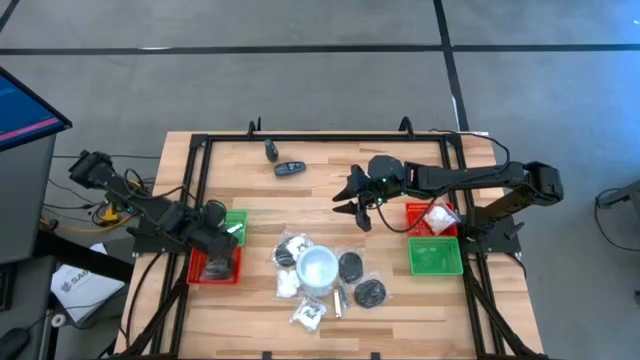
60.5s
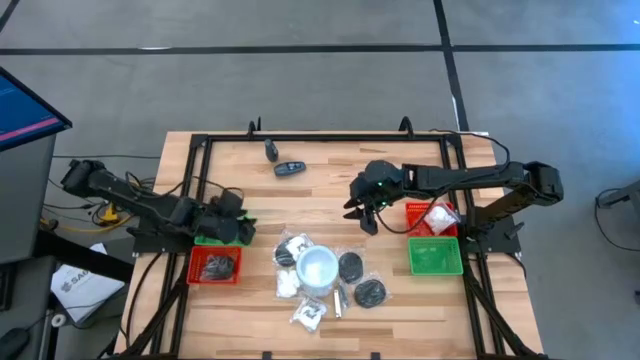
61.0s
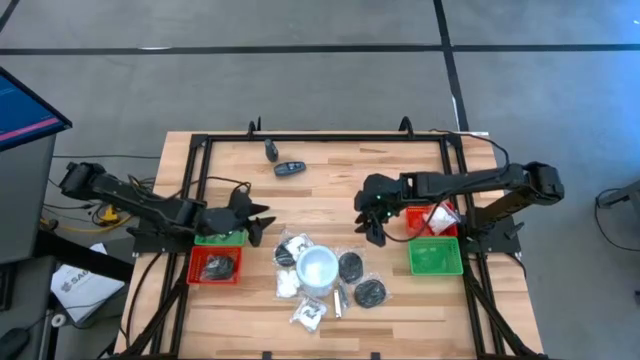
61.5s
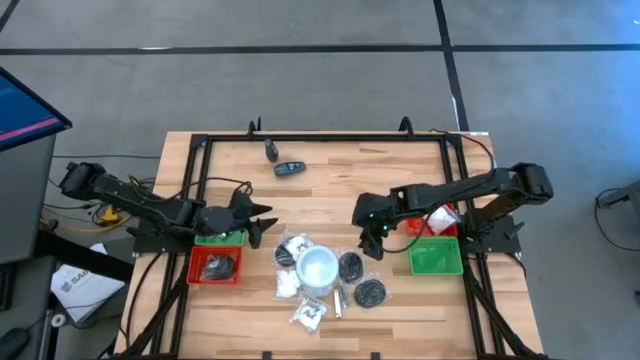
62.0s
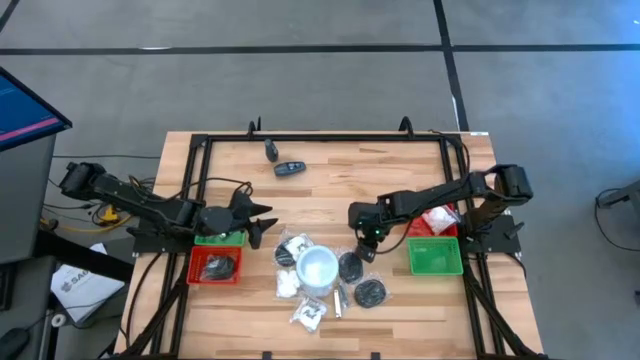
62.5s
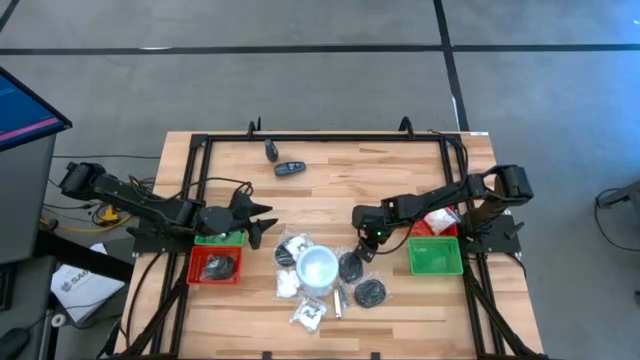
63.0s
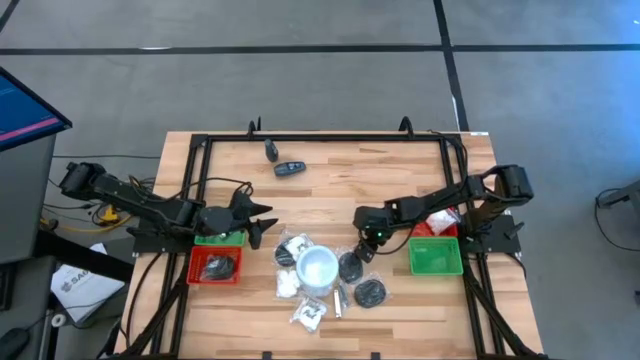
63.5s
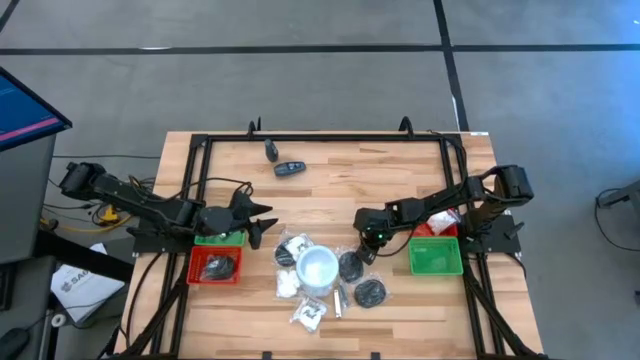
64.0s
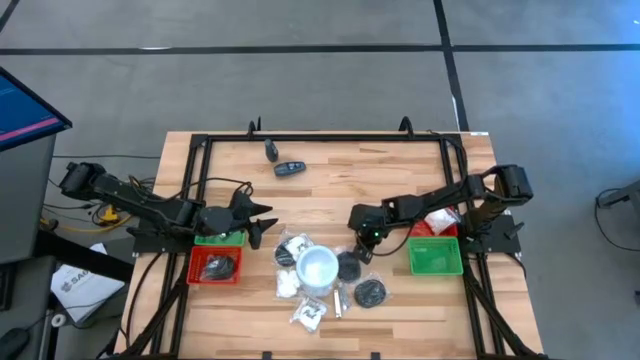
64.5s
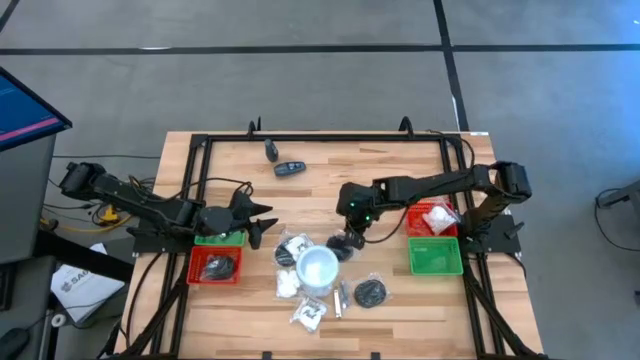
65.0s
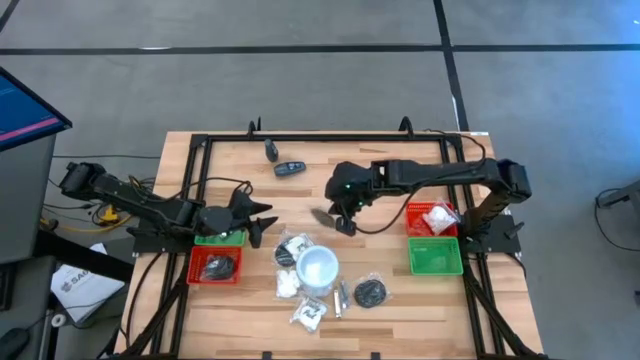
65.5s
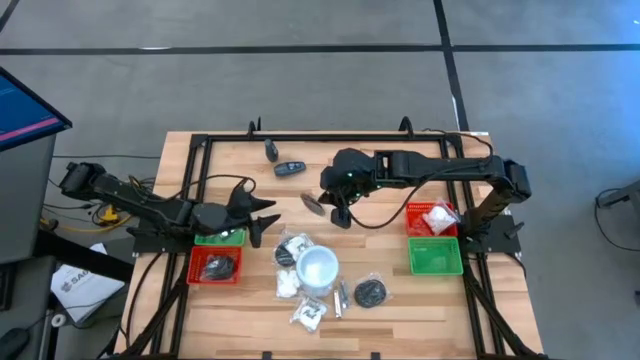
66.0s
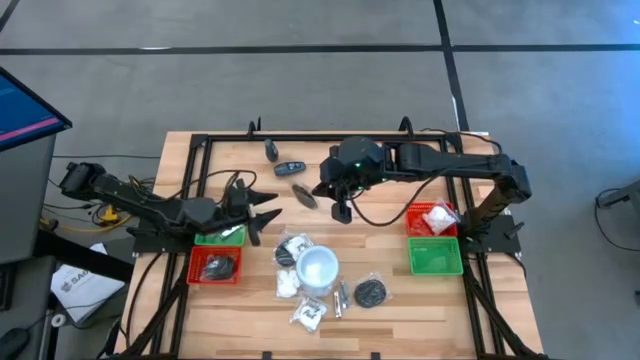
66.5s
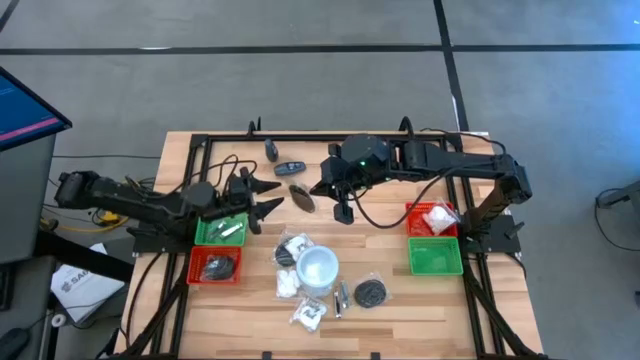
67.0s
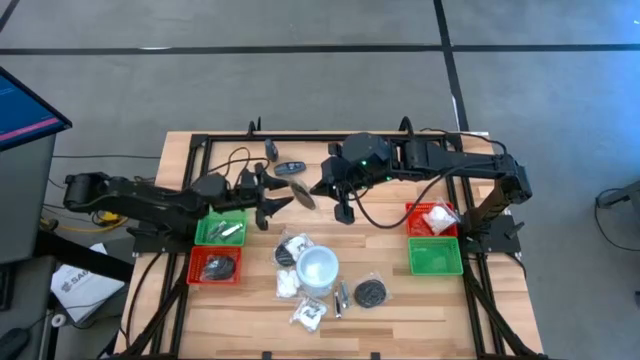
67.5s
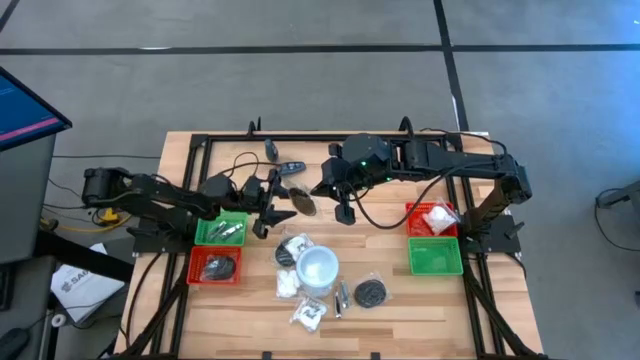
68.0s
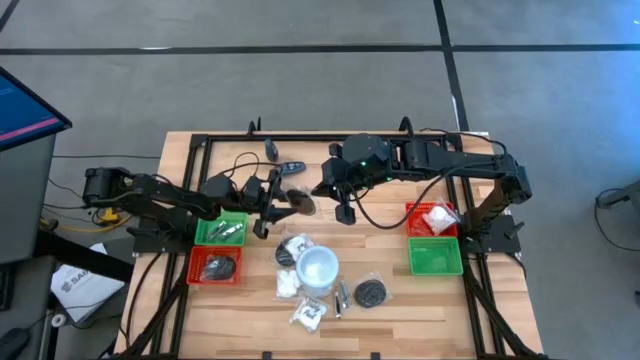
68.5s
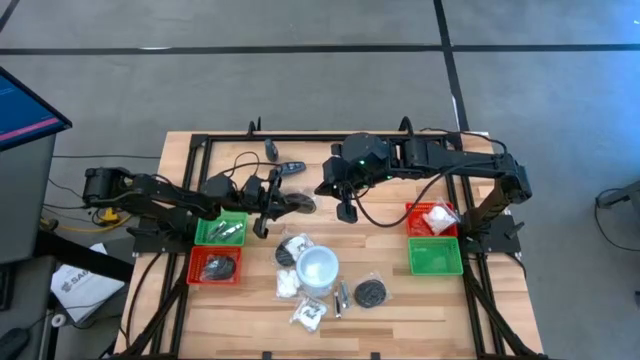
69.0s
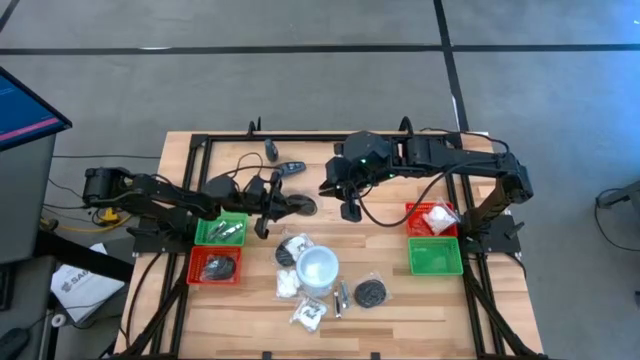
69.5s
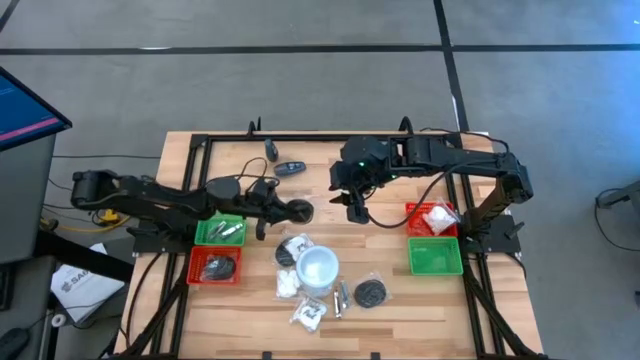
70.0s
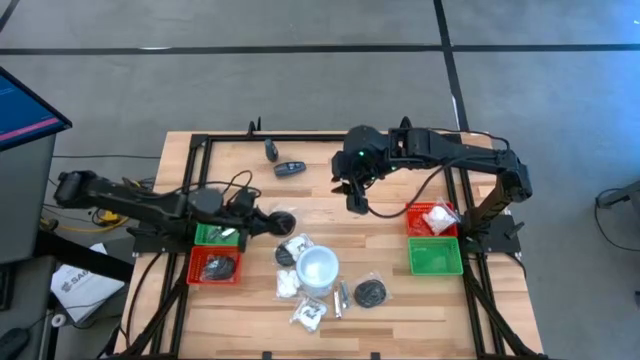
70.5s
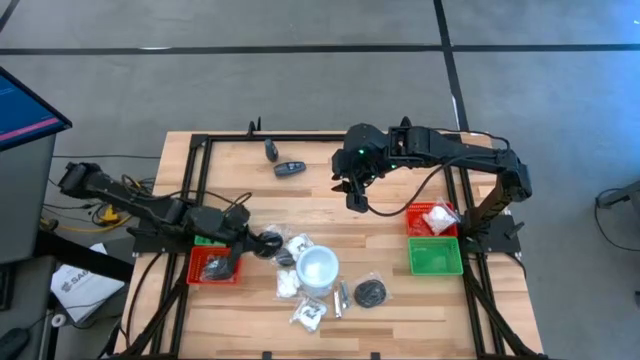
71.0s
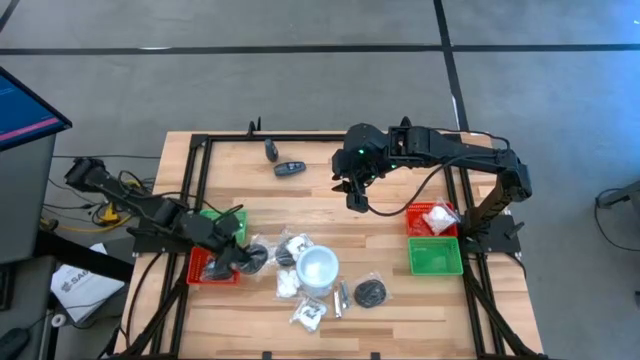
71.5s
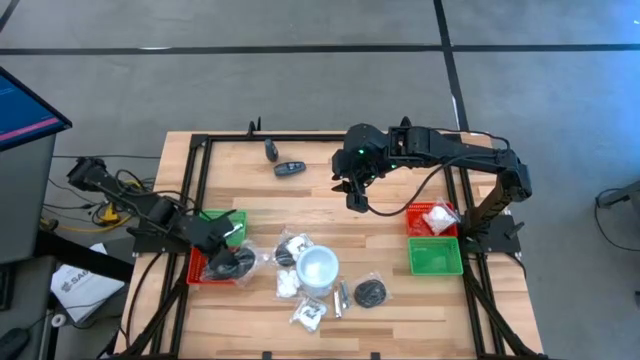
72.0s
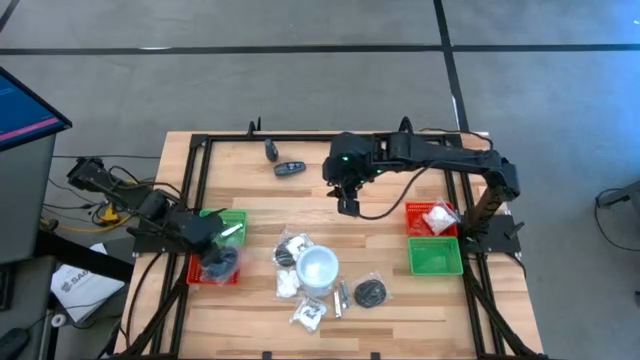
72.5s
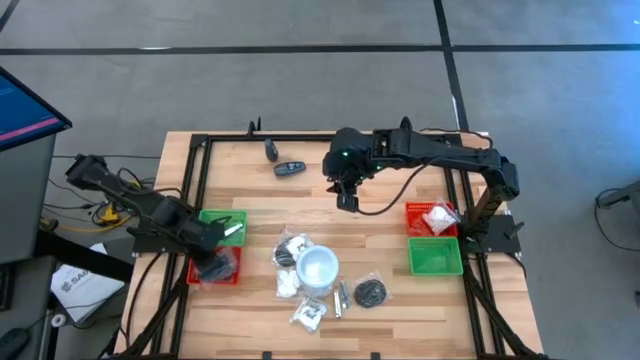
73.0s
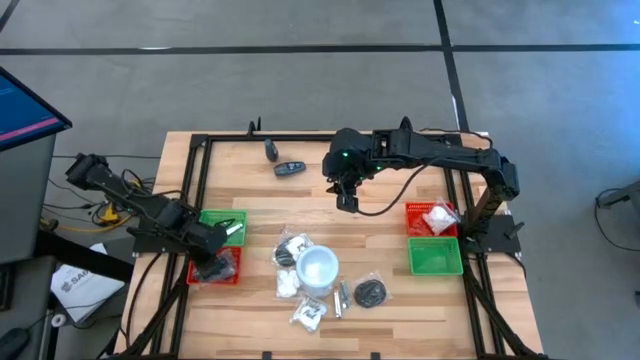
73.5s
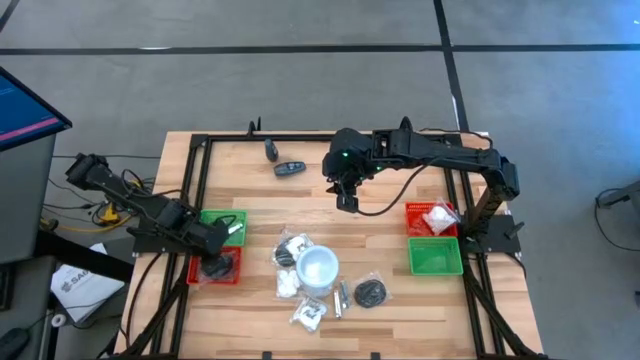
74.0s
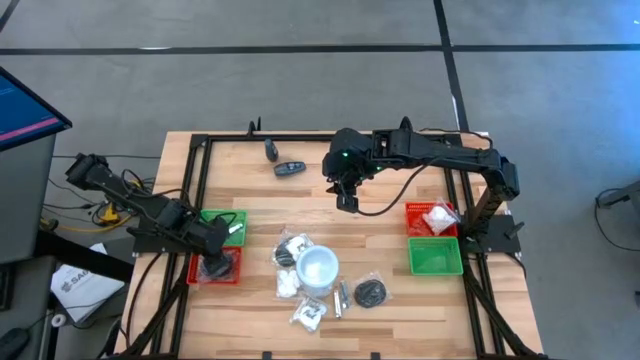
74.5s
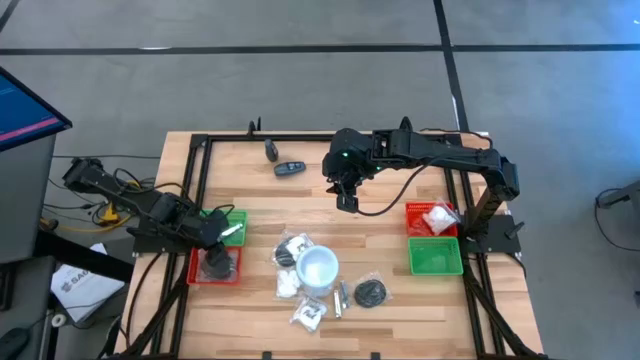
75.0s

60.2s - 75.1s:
Task: Pick & Place Travel size toiletries
Put the black hairbrush into the left red bin

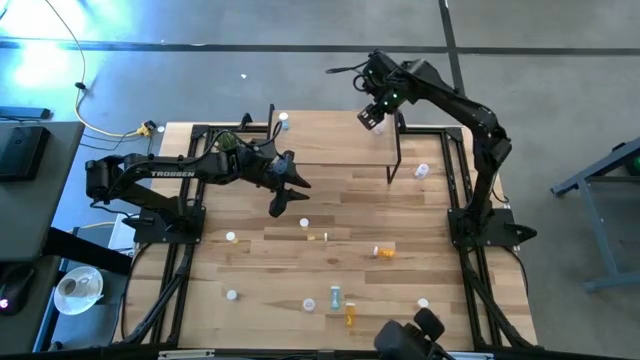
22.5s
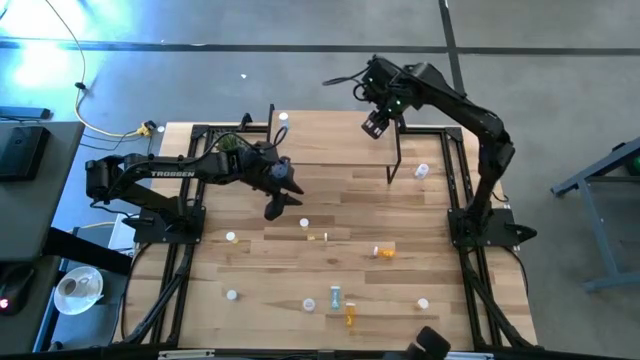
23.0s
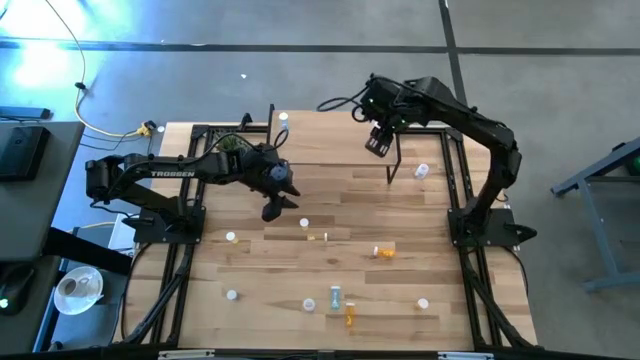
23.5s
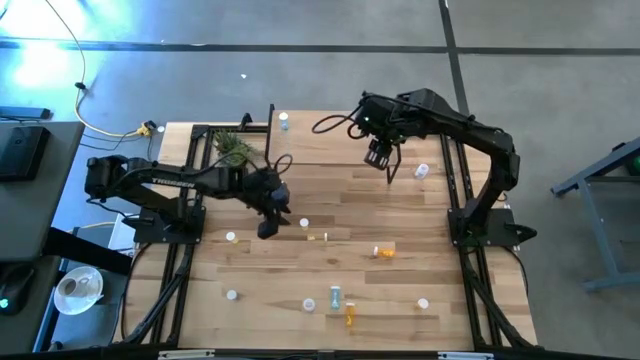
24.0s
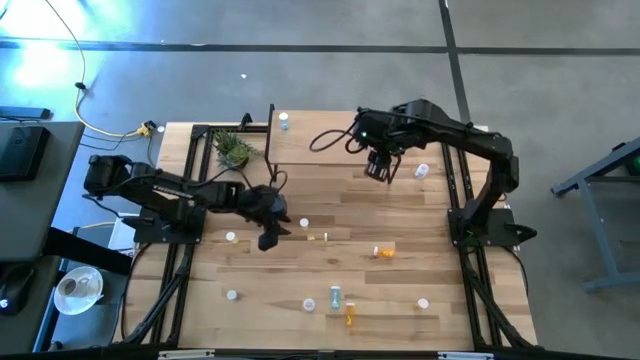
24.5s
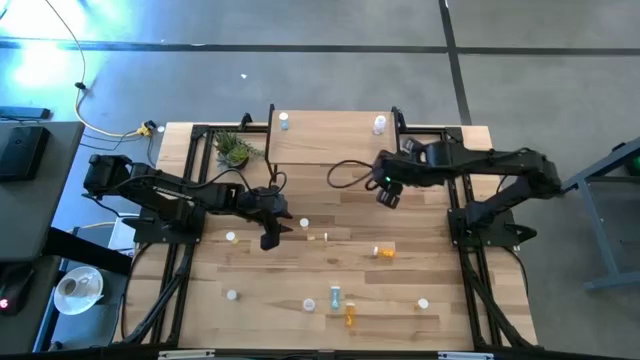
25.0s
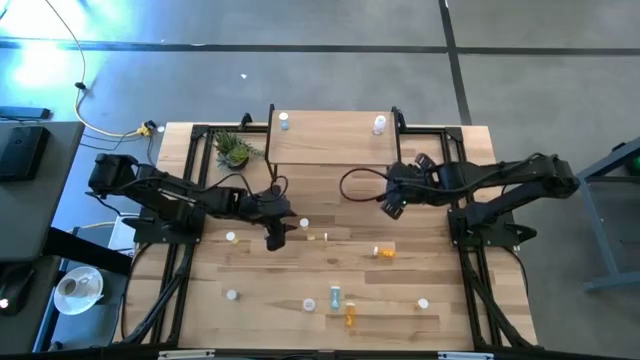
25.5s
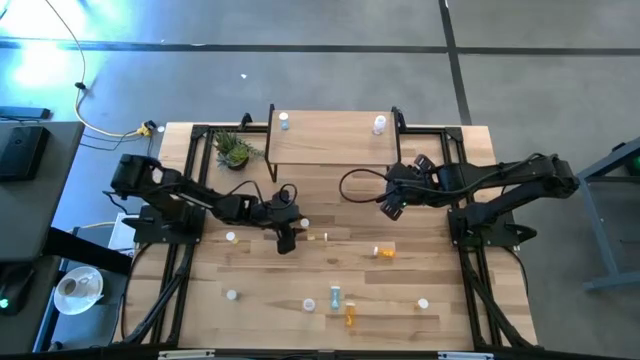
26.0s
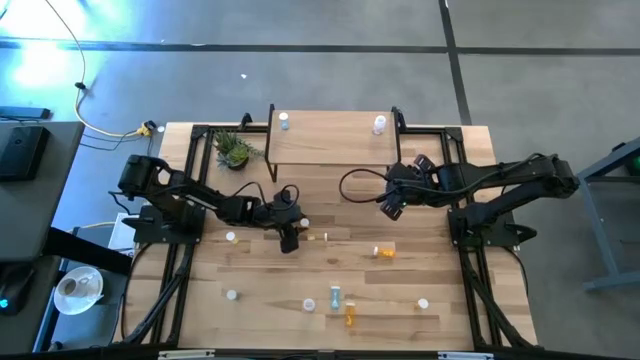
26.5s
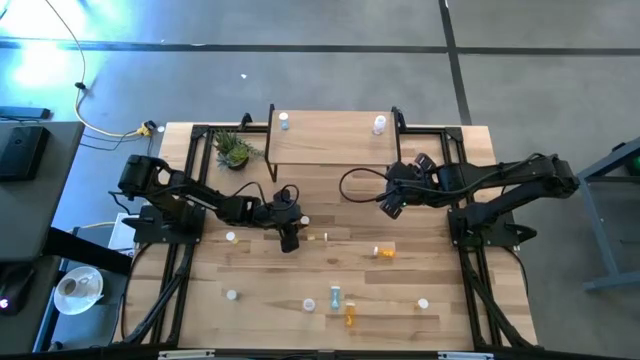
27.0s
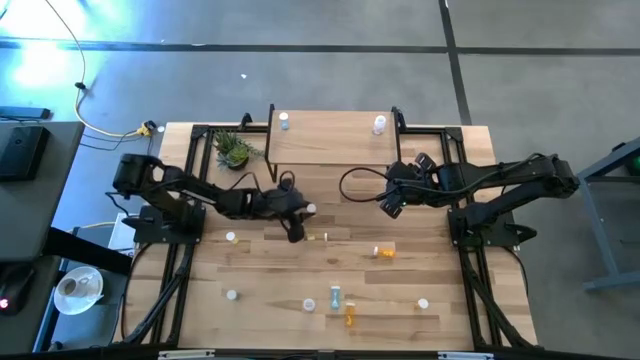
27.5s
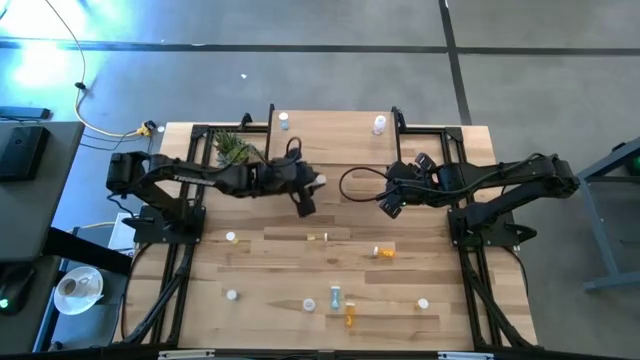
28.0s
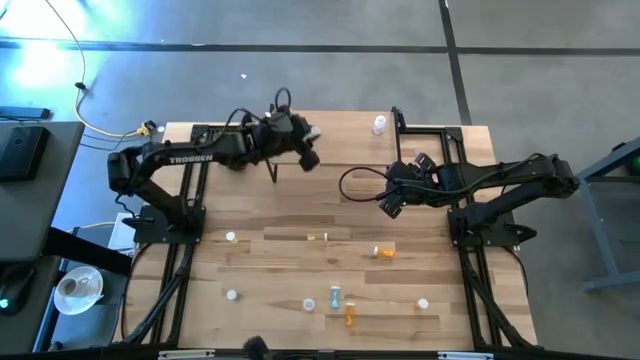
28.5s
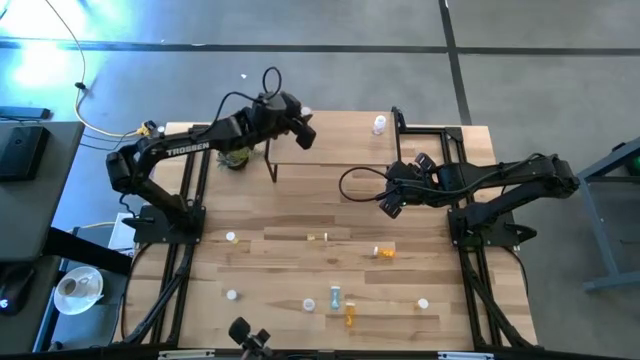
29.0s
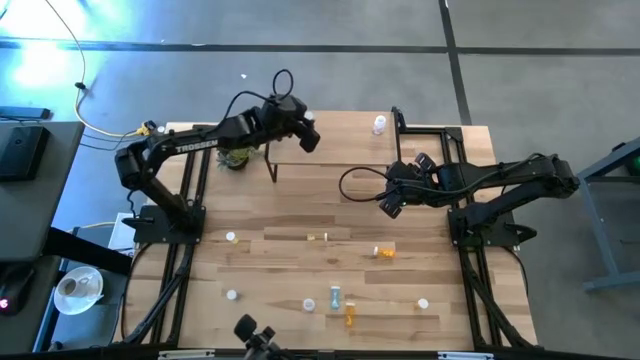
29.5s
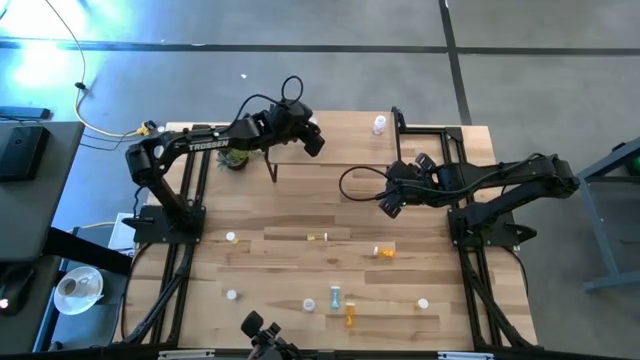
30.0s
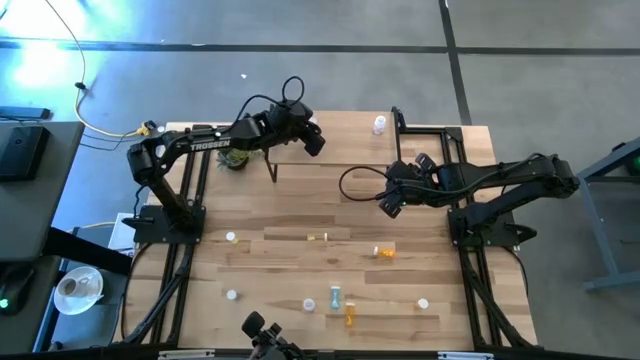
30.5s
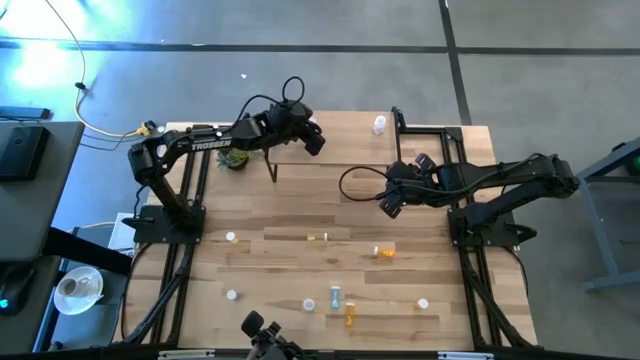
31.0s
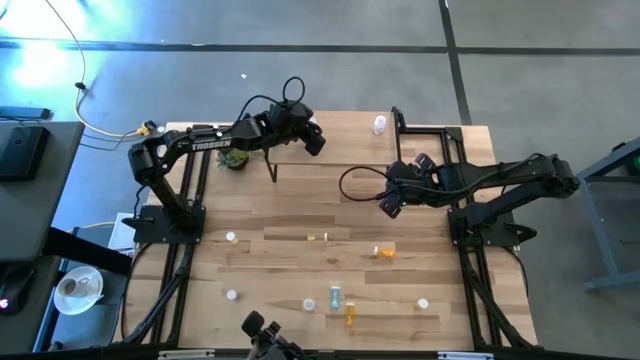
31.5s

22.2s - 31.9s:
Task: Pick and place medicine bottles onto shelf by color
Put the top right yellow pill bottle on the shelf
